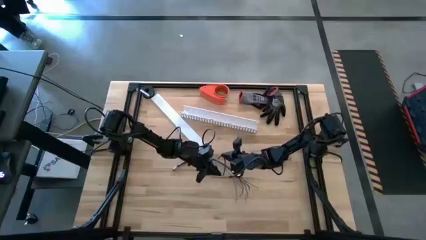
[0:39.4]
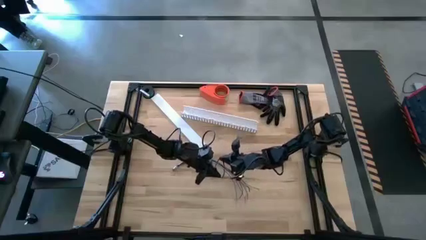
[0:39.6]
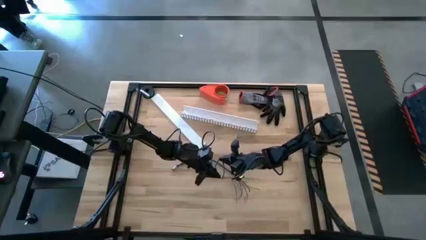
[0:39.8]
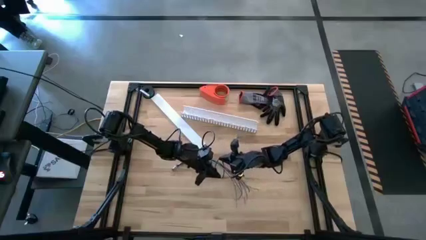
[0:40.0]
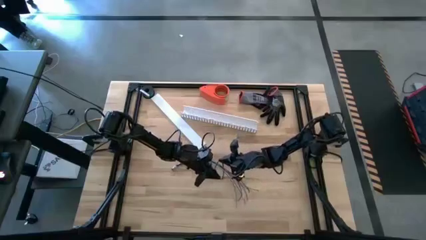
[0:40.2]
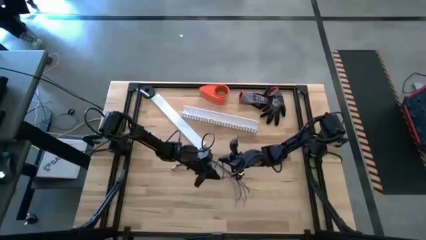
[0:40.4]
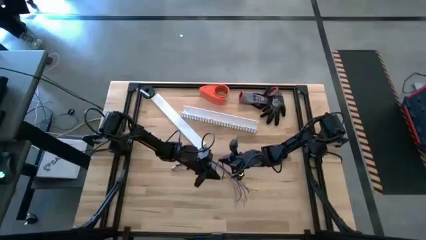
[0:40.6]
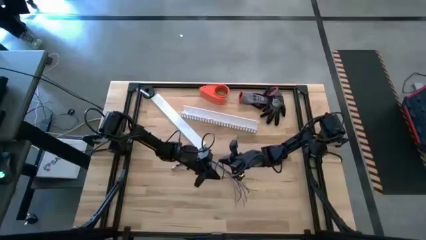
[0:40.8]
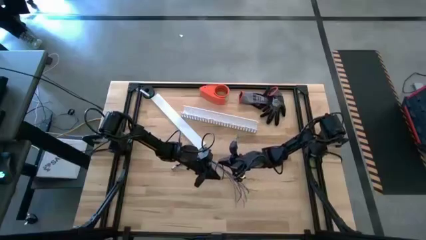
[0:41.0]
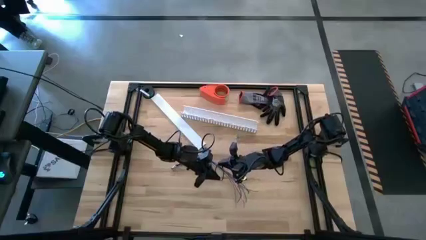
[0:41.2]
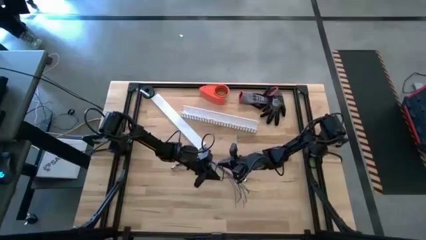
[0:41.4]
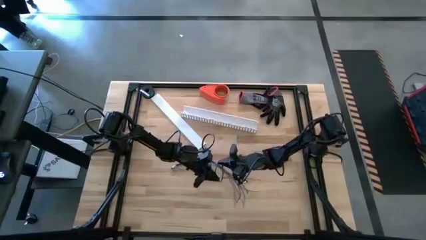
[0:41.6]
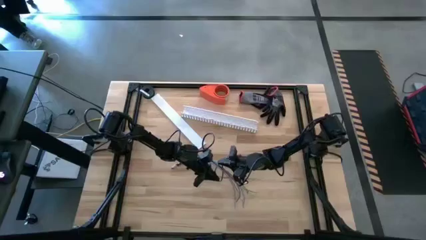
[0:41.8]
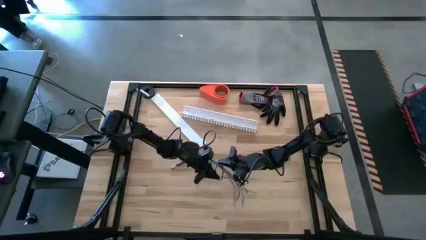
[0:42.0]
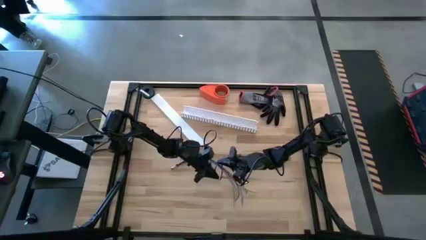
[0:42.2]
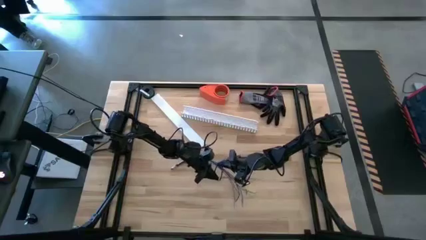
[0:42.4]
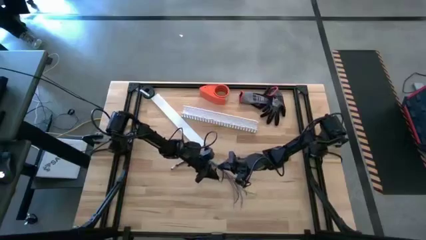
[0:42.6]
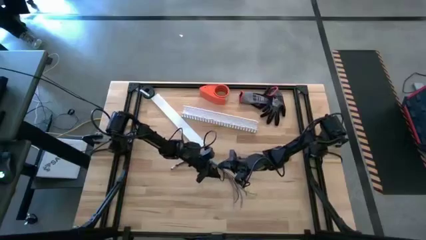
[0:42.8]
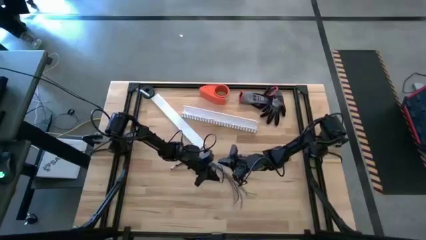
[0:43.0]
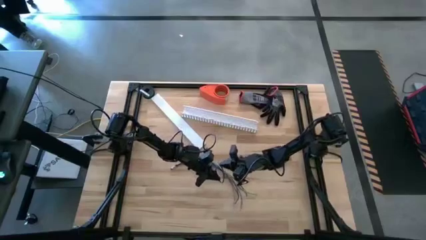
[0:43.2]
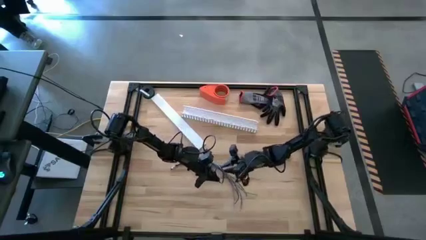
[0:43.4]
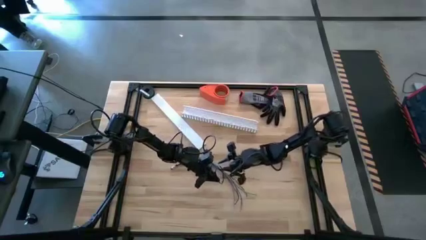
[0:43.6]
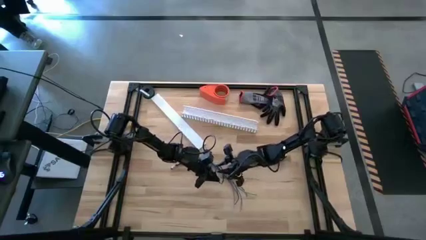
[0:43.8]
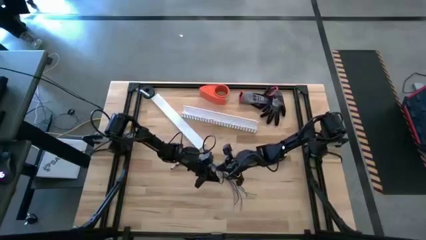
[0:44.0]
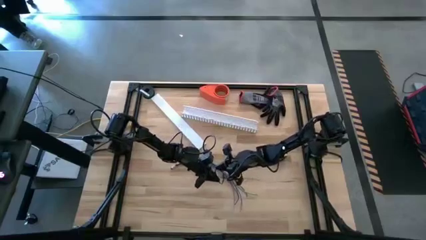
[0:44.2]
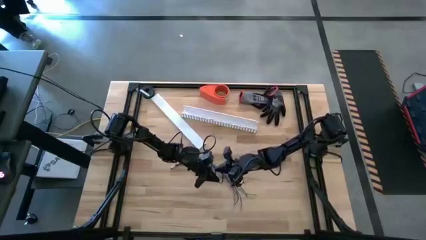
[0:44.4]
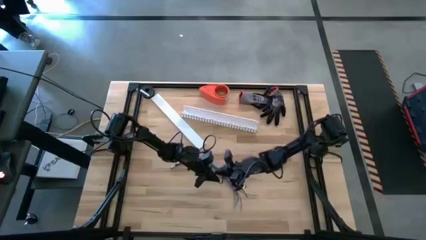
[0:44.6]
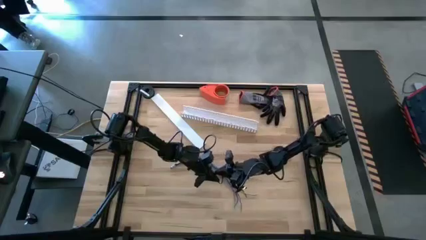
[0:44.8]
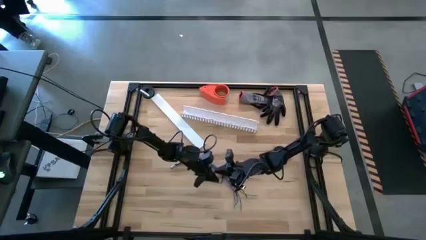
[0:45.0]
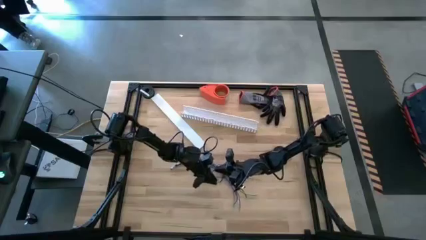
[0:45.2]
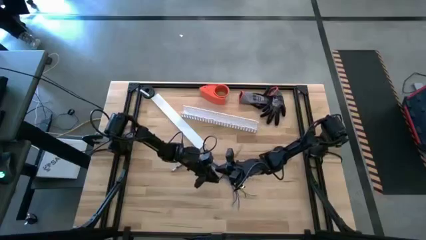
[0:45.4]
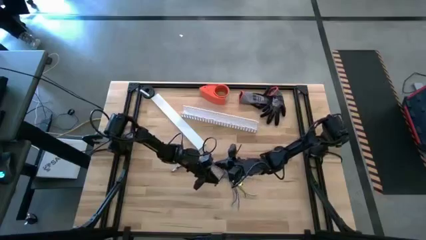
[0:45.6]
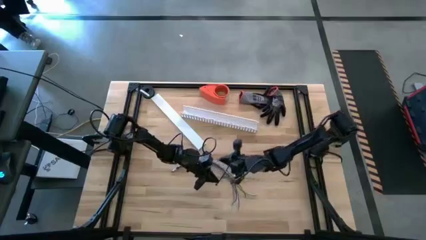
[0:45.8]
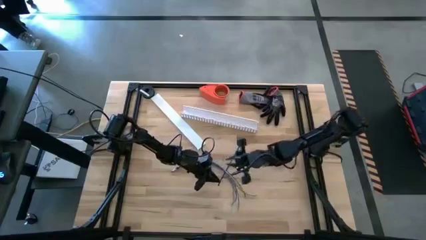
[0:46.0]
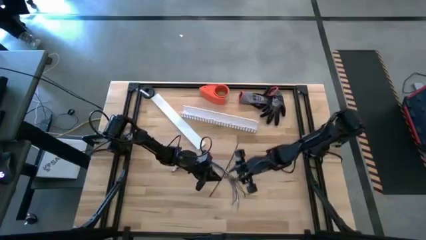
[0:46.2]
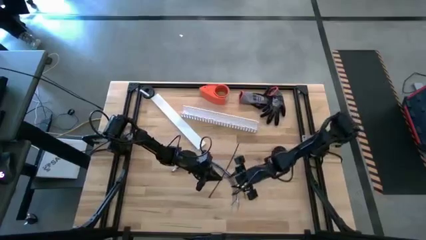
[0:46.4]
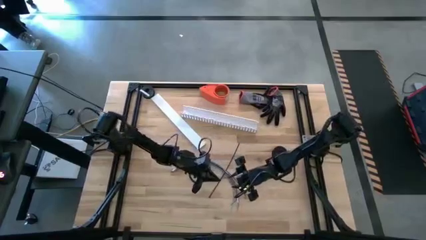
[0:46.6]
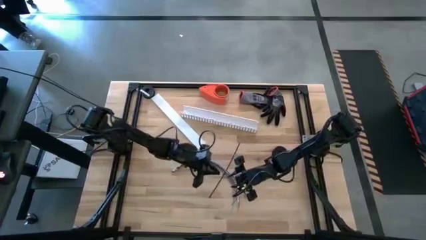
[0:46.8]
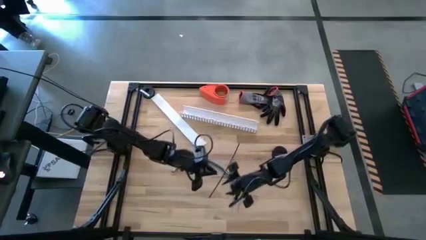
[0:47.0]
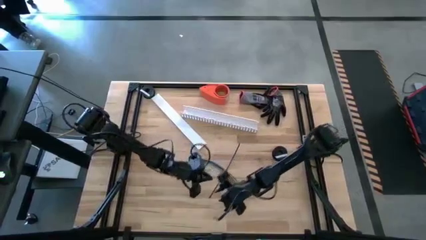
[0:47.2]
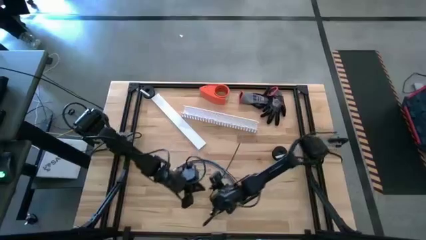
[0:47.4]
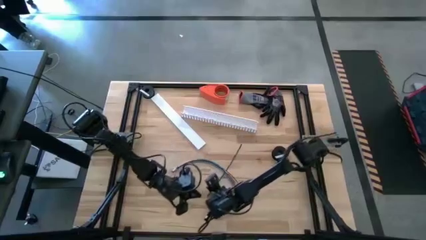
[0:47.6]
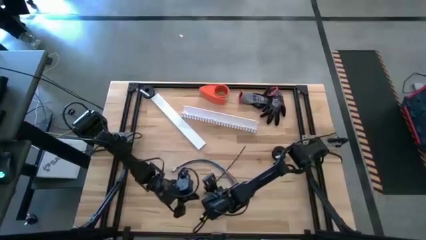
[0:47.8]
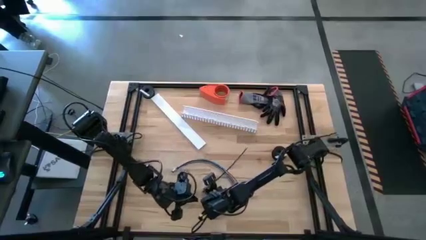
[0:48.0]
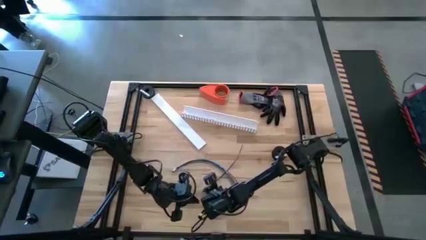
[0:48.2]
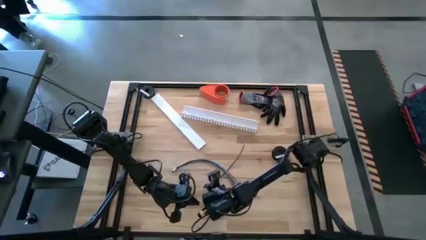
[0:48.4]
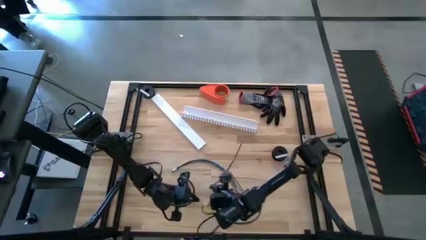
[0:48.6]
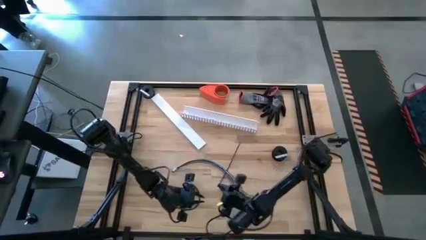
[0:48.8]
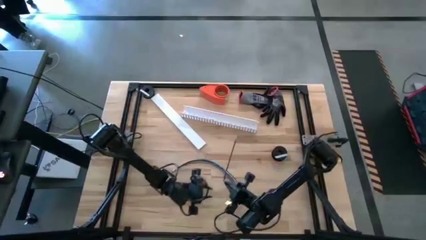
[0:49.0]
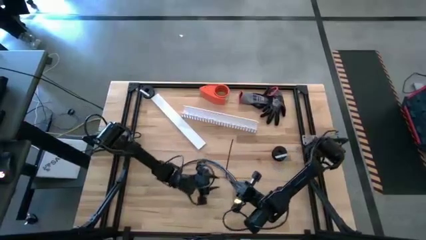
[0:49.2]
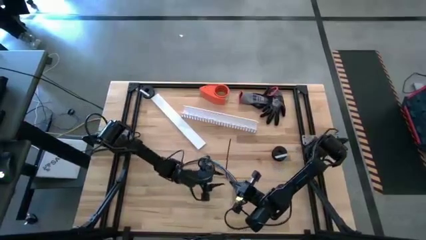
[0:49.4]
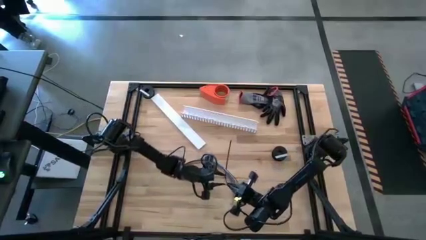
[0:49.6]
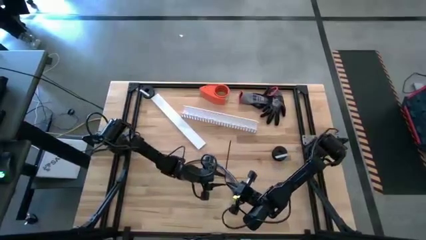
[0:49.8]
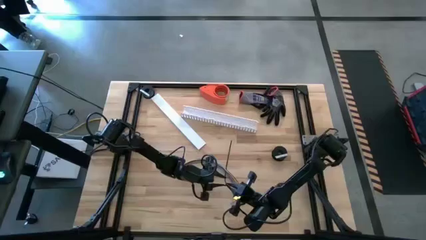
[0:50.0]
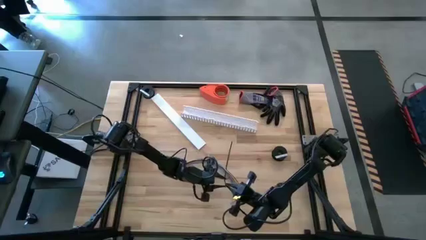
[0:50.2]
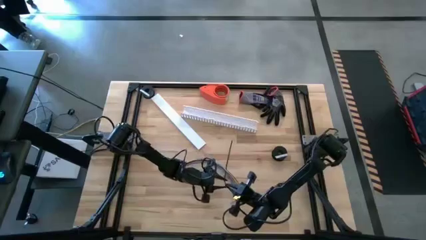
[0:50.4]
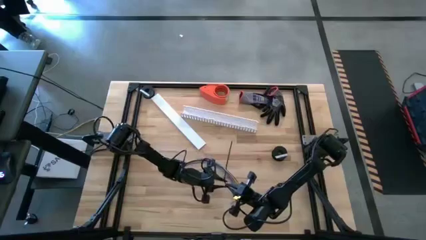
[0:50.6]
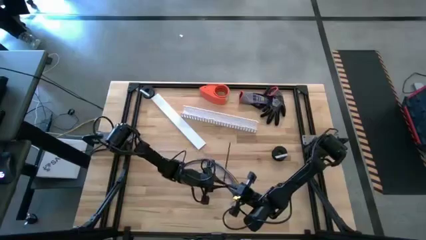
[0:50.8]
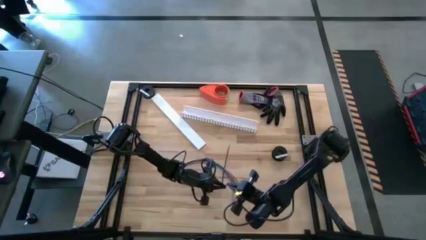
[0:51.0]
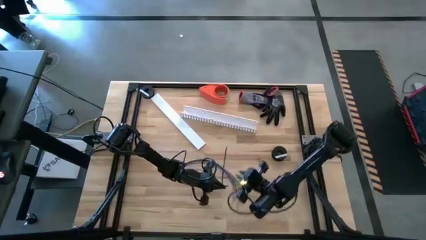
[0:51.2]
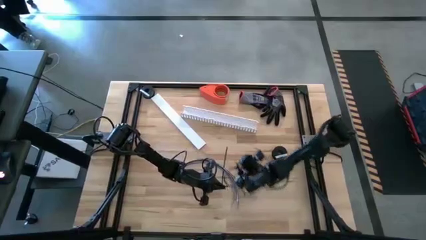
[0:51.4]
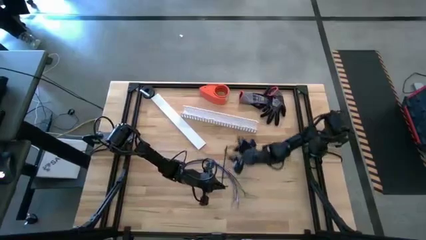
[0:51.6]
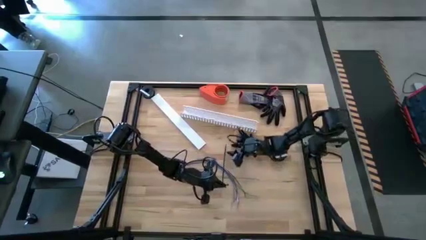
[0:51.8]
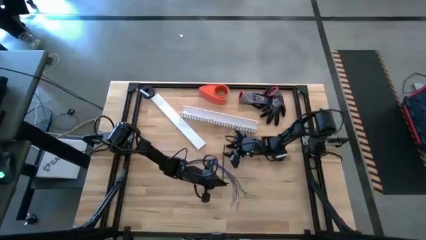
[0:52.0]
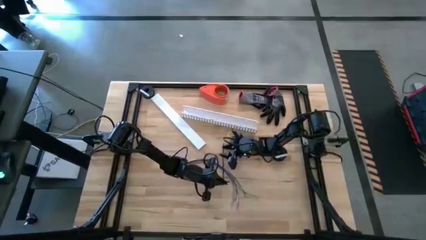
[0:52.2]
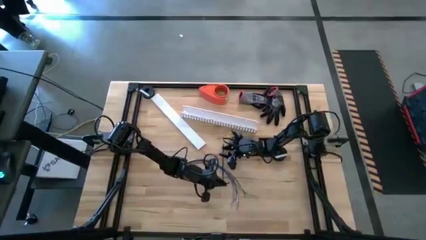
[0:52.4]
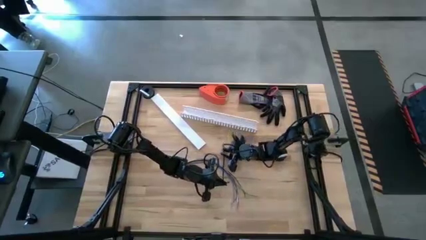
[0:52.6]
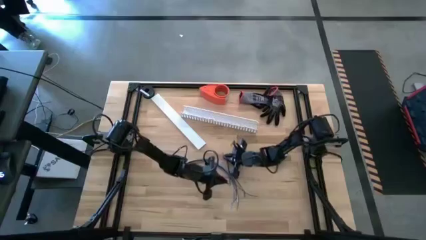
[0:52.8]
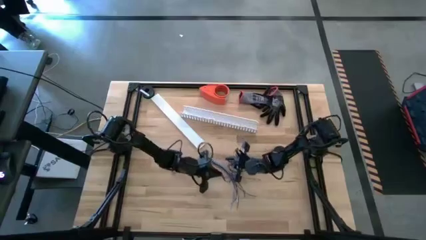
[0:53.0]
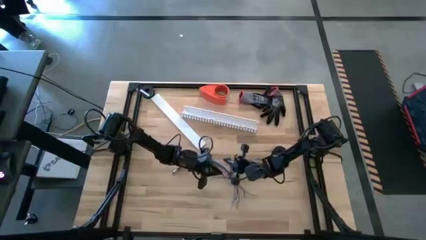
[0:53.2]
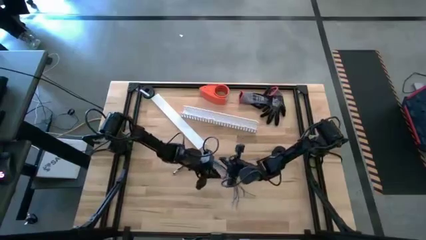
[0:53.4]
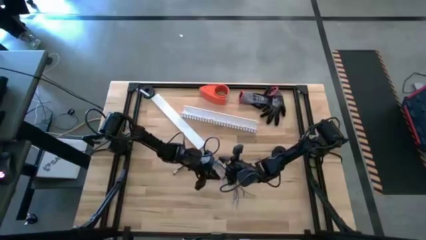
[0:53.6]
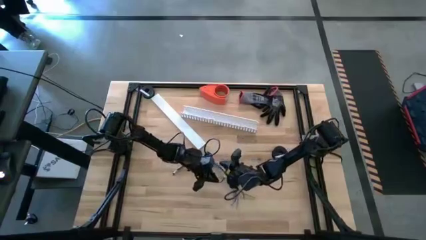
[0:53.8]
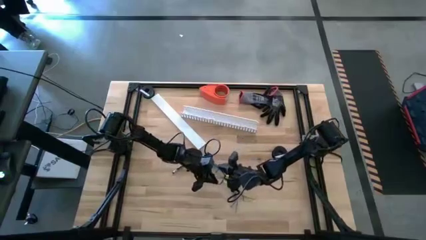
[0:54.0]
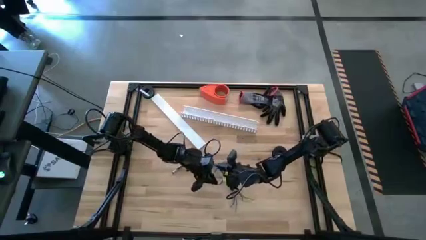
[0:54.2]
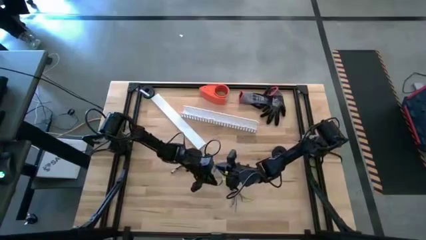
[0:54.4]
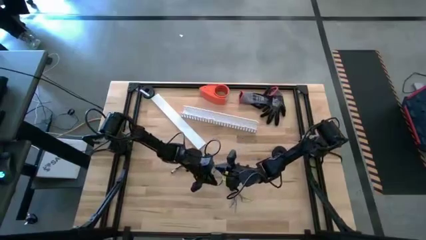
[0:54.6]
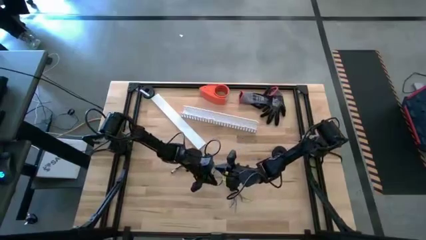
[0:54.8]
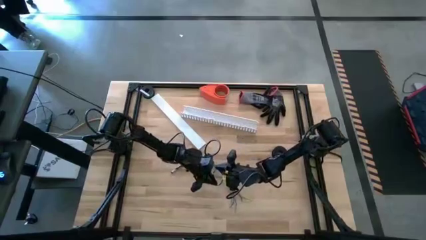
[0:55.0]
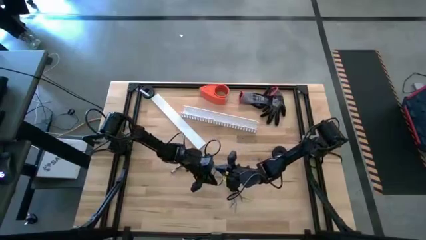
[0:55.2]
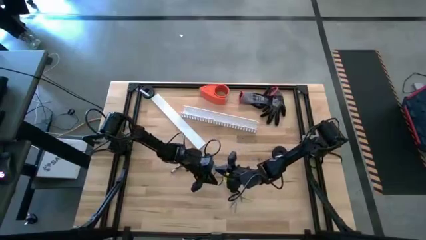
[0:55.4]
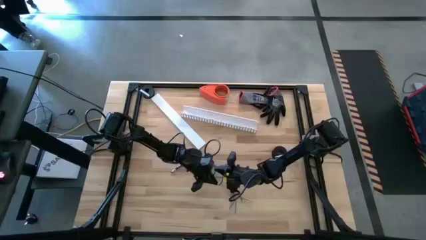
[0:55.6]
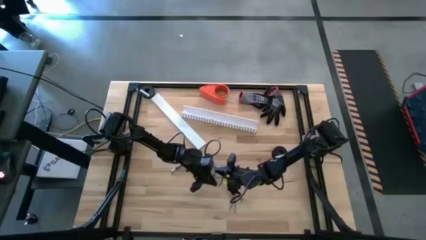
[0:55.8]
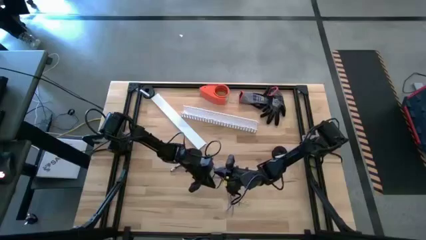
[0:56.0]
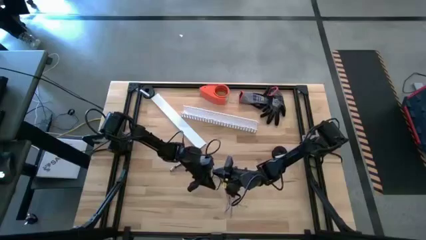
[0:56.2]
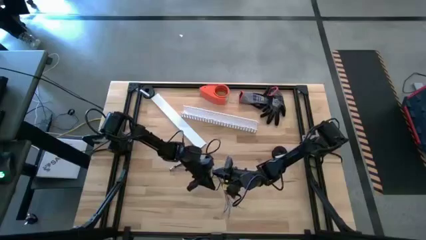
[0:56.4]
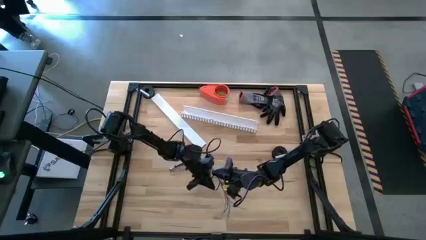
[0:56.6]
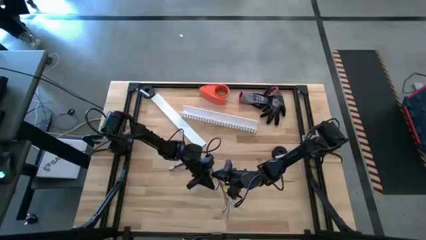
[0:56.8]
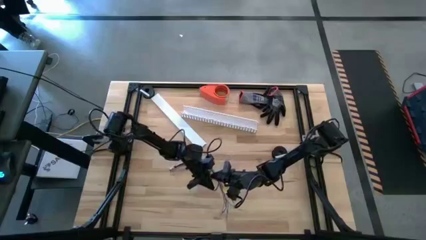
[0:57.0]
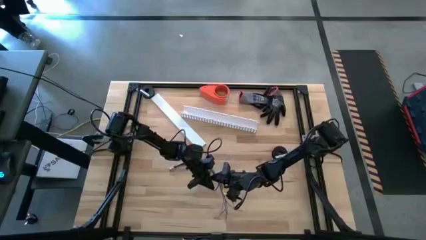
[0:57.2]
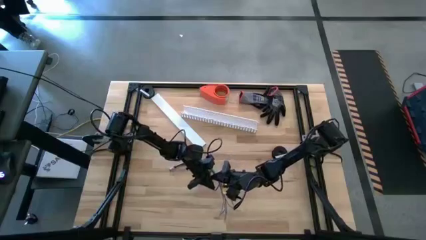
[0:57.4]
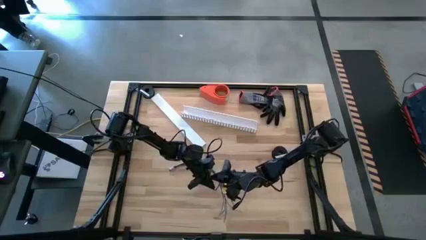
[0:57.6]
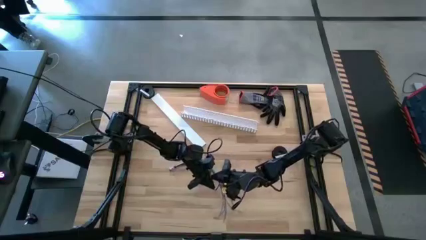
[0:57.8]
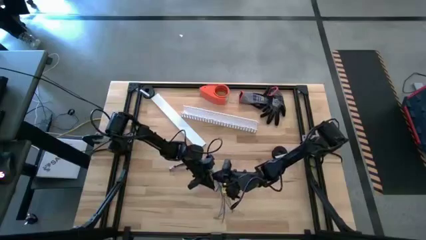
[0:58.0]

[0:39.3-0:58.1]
Task: Ziptie cables
Wrap the cable wires with the black zip tie
